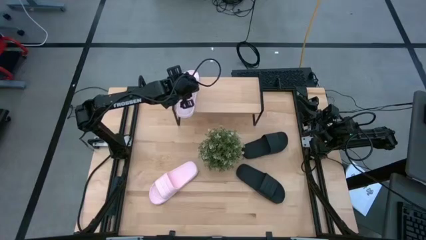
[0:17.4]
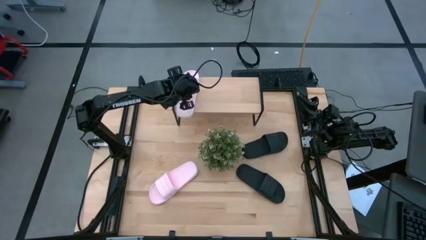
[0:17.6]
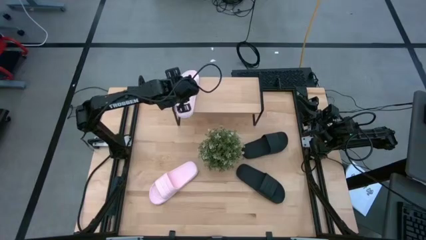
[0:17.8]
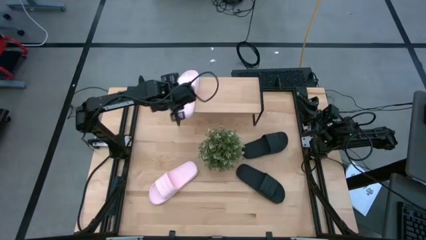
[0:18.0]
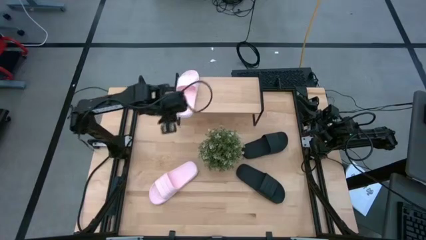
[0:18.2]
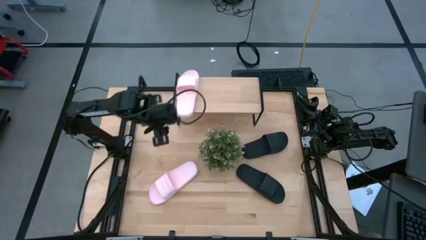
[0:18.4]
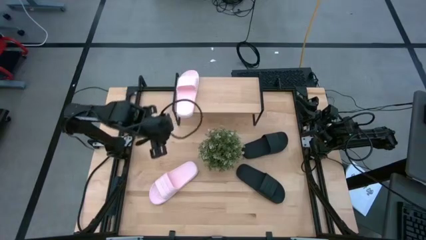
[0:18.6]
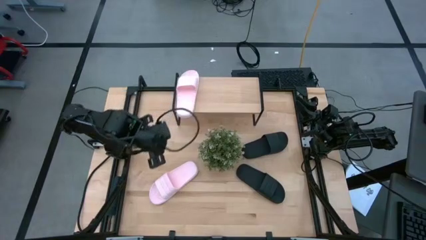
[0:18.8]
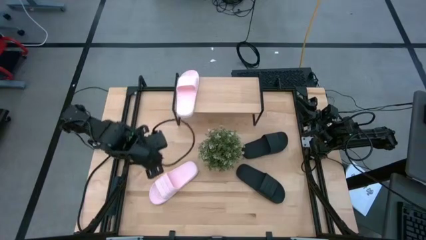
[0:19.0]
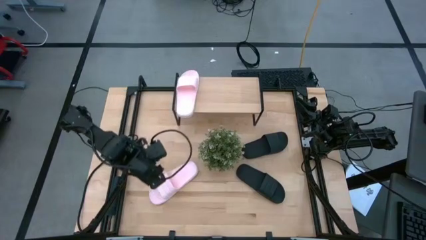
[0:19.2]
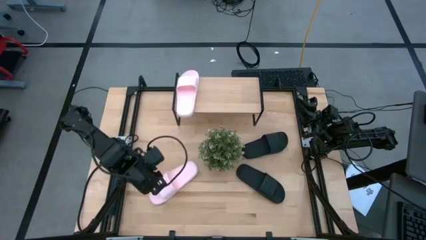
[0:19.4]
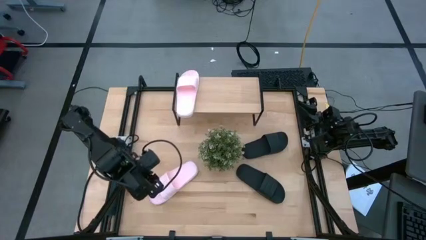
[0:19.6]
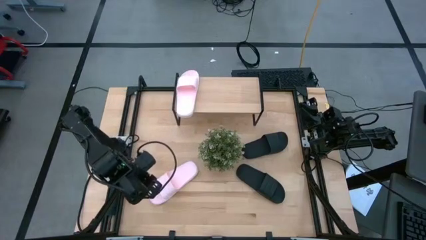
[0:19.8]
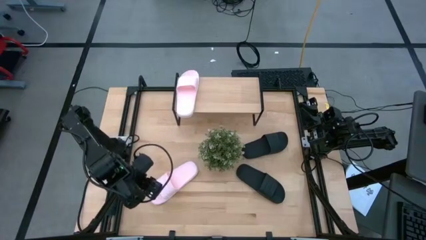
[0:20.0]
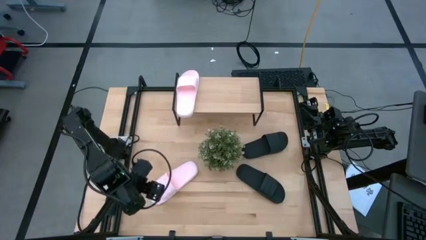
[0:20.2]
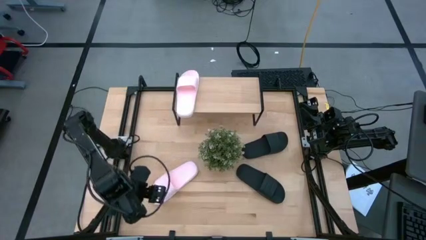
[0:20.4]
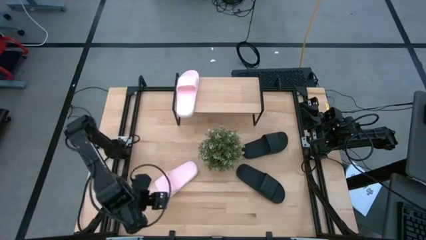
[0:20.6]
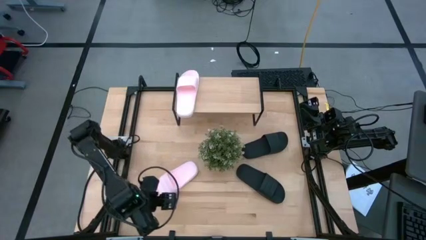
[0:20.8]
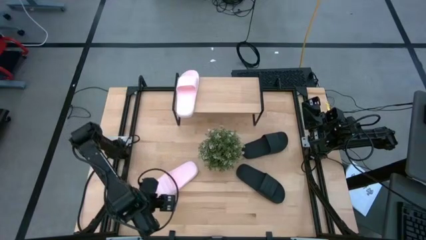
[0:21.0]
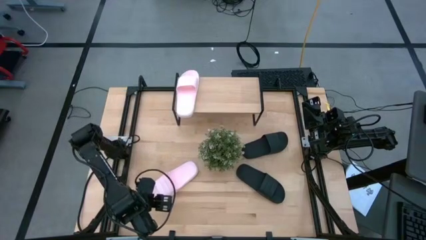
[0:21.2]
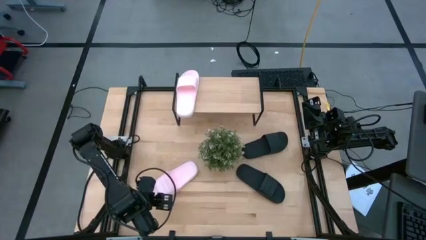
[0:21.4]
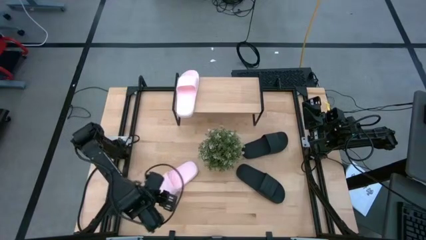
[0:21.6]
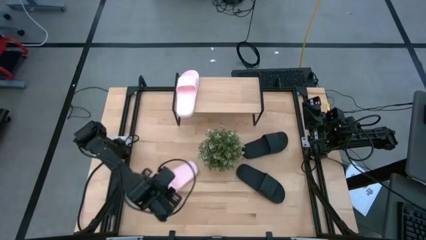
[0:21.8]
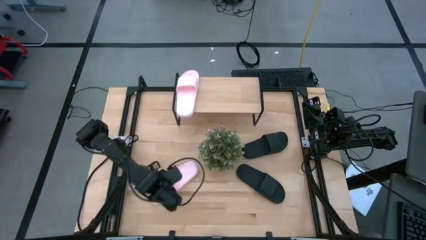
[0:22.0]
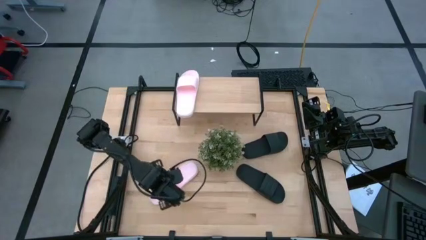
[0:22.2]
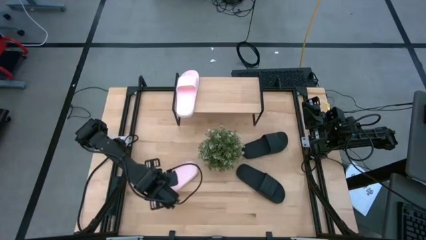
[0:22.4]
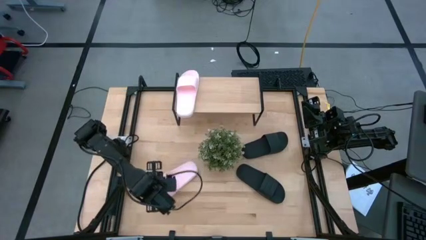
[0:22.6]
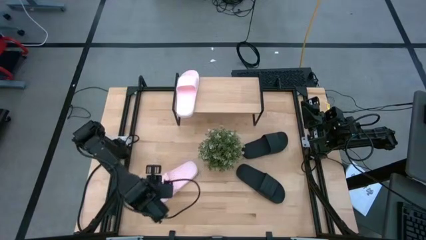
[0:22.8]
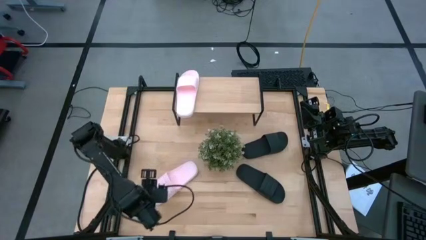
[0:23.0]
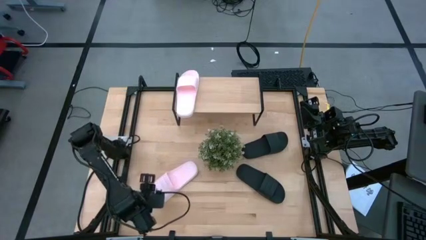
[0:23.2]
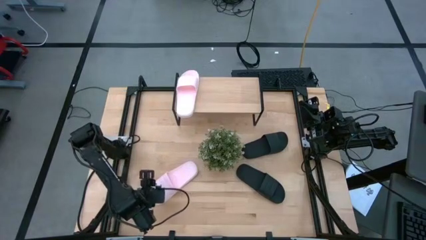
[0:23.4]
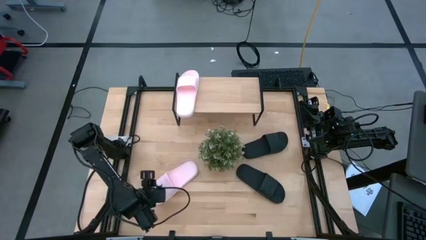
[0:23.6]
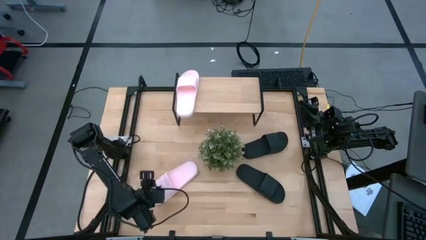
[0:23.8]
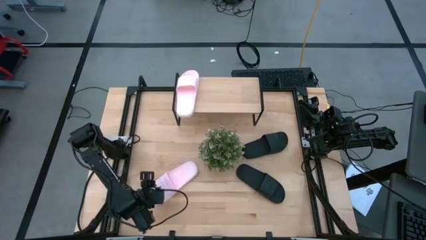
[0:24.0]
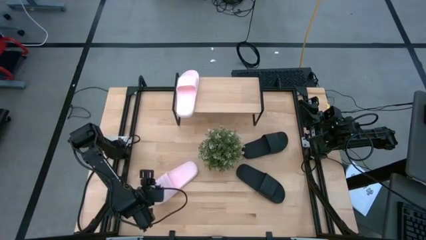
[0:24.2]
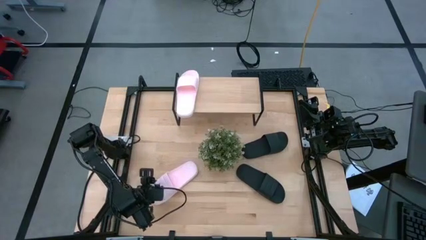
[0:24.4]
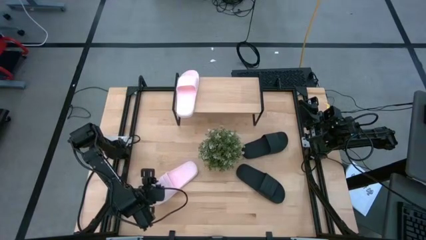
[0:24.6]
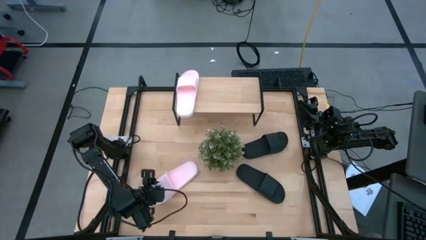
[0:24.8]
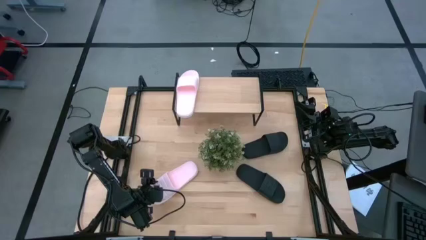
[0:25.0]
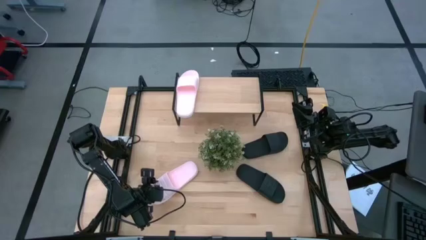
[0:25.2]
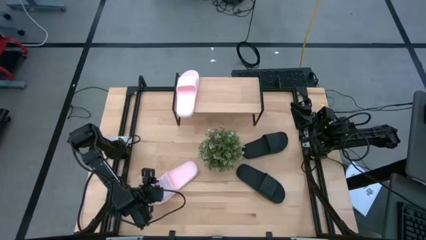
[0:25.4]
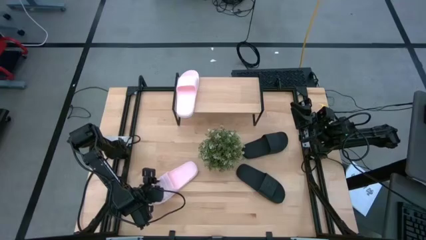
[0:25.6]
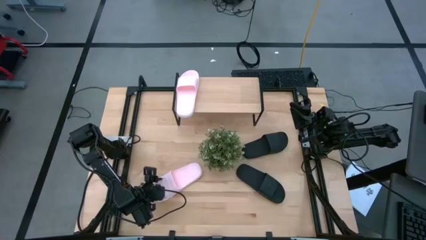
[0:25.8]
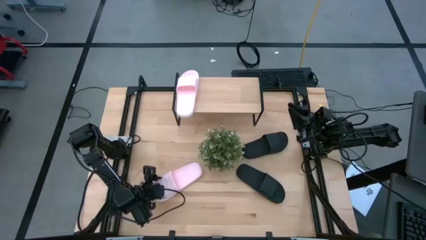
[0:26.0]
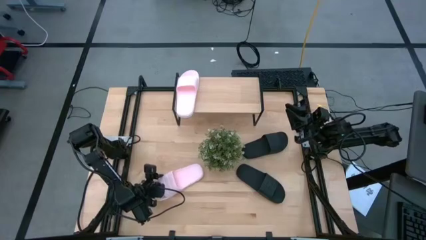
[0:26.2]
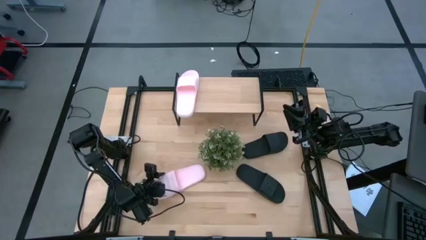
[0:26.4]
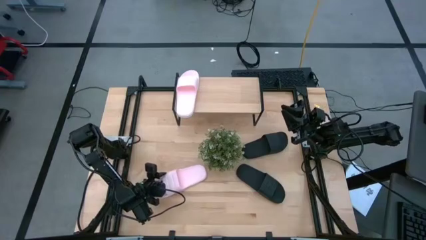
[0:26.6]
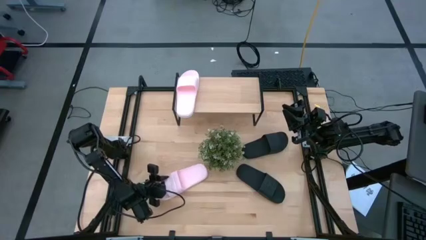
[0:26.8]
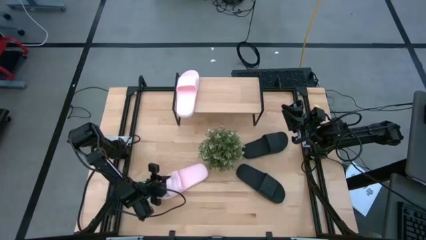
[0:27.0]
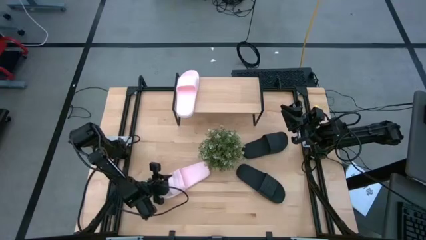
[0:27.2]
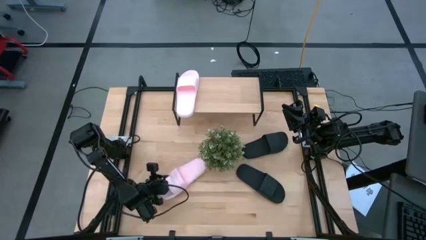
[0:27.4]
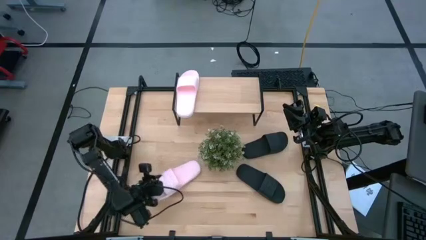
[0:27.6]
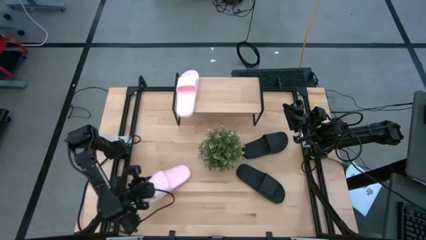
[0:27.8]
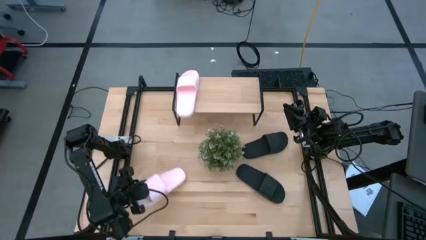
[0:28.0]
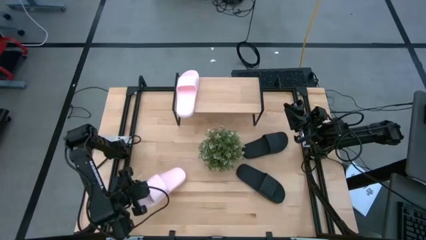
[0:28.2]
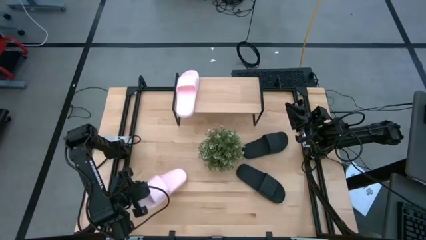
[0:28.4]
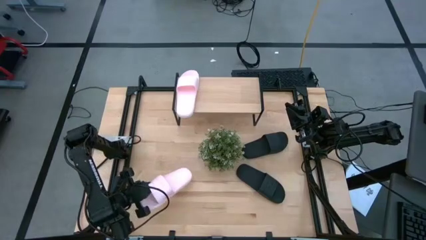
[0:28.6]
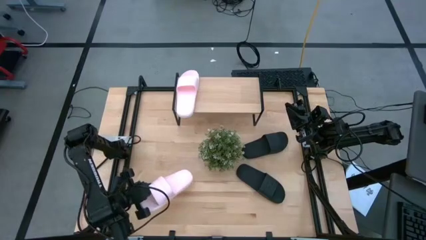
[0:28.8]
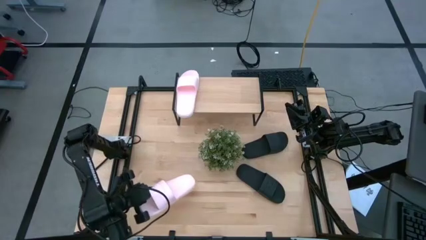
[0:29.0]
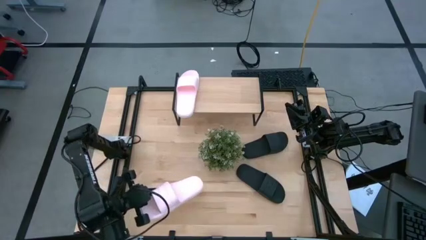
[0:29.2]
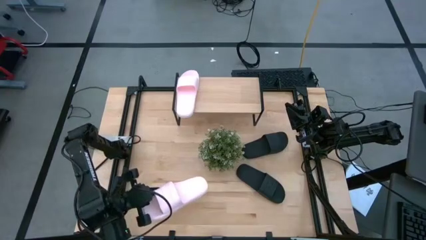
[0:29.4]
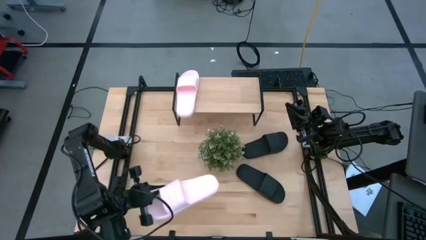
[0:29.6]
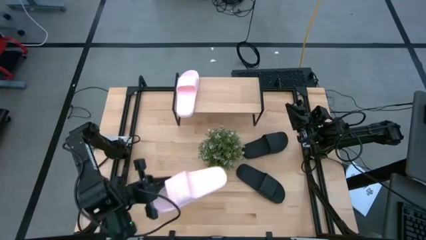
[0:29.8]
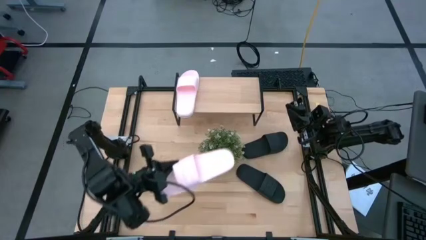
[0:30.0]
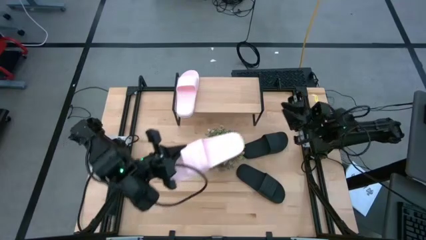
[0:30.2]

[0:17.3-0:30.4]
Task: Pick and place slides into the shelf
Put the pink slipper on the shelf
